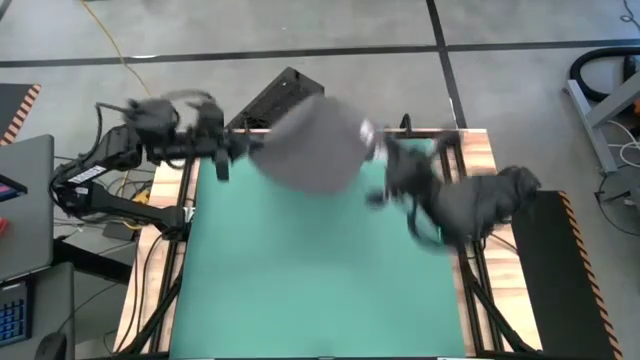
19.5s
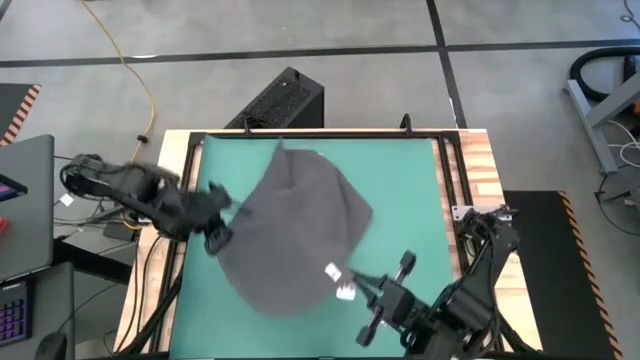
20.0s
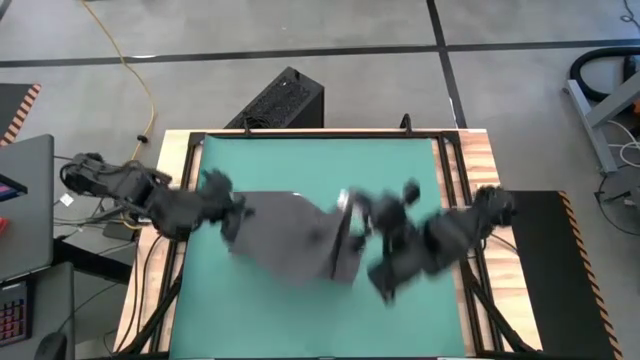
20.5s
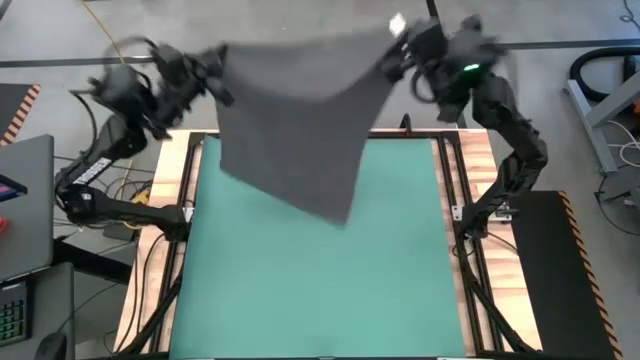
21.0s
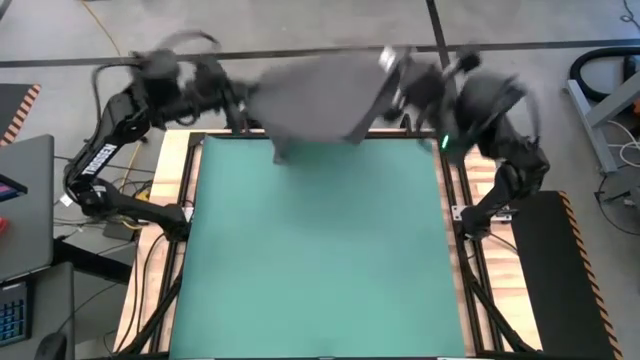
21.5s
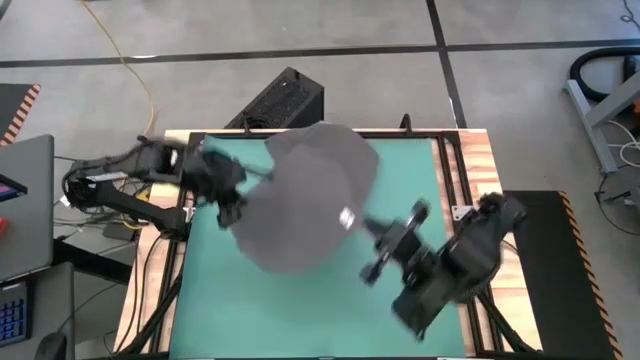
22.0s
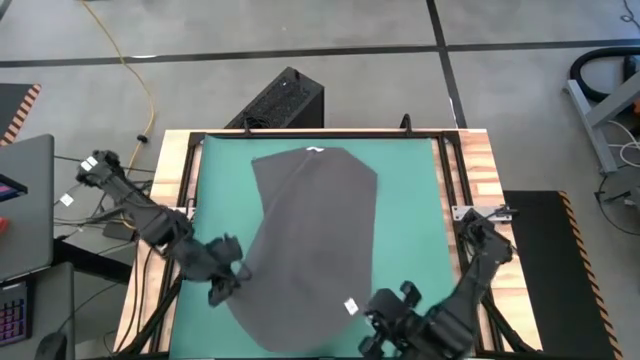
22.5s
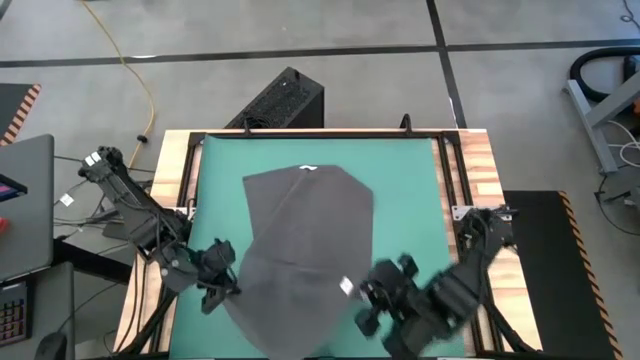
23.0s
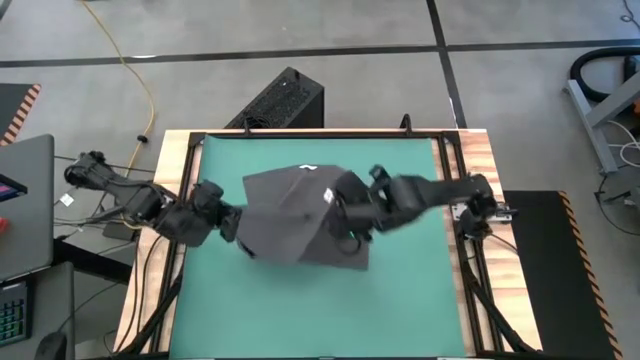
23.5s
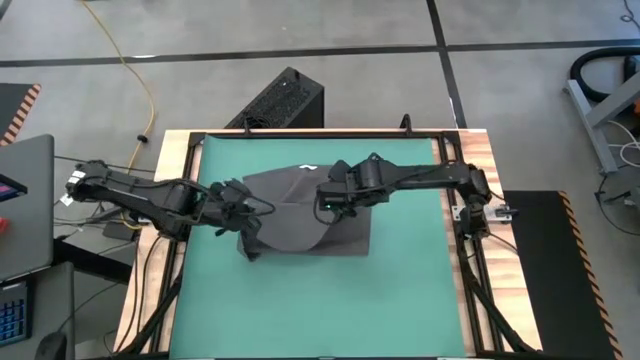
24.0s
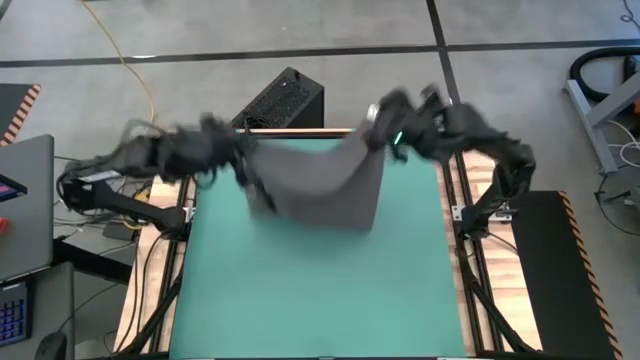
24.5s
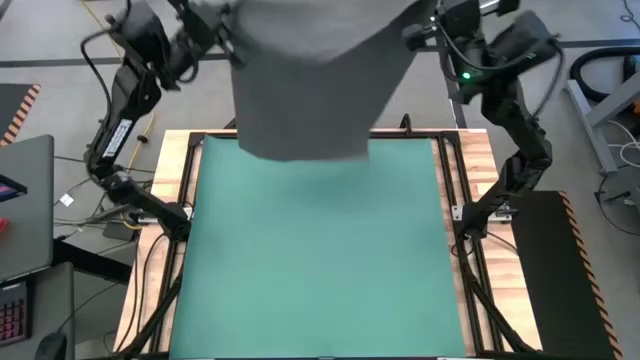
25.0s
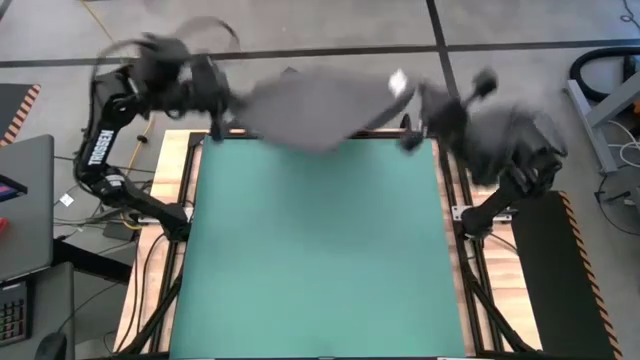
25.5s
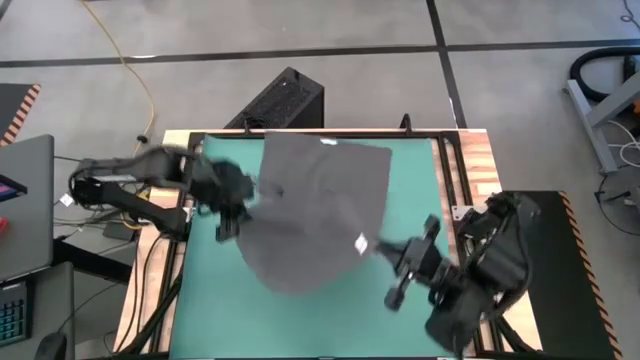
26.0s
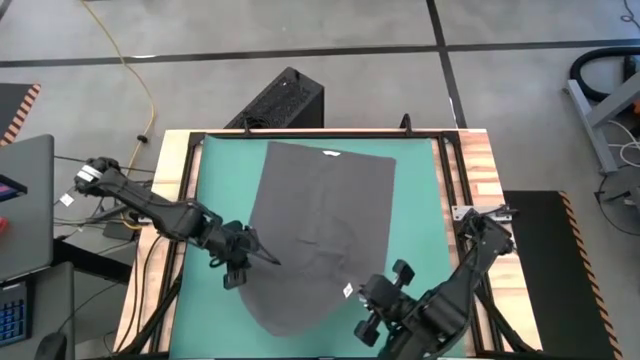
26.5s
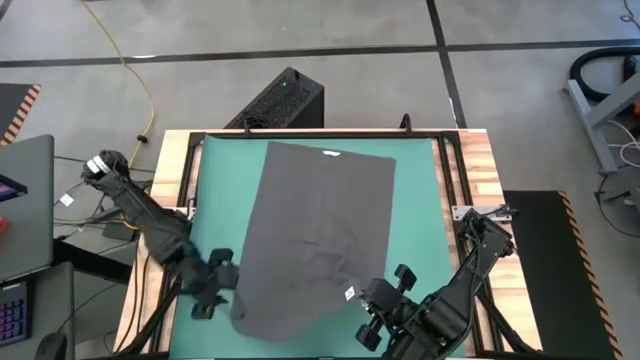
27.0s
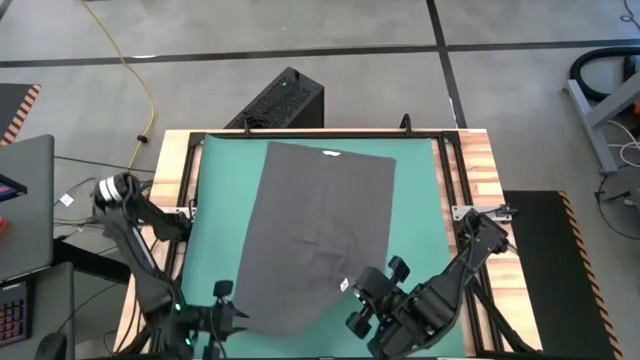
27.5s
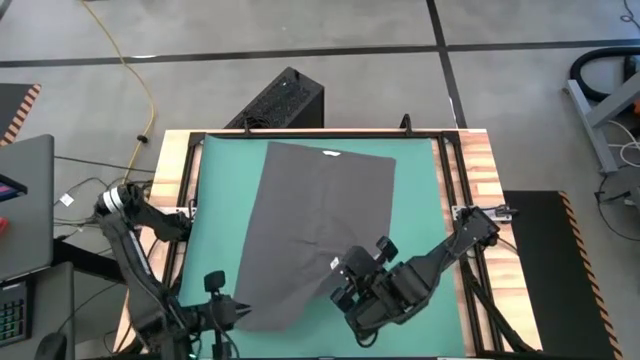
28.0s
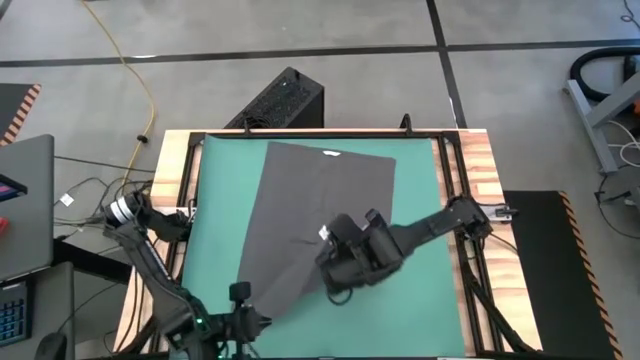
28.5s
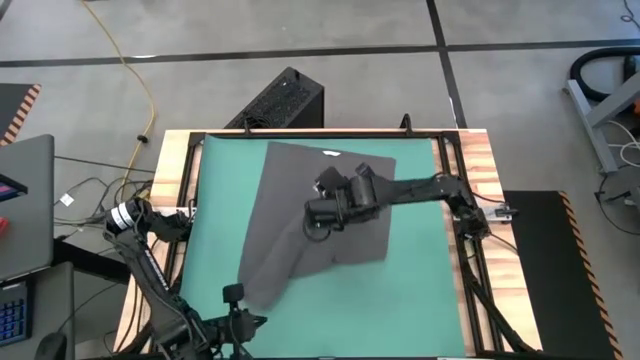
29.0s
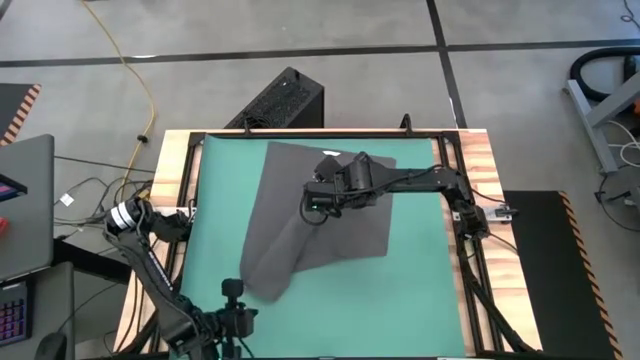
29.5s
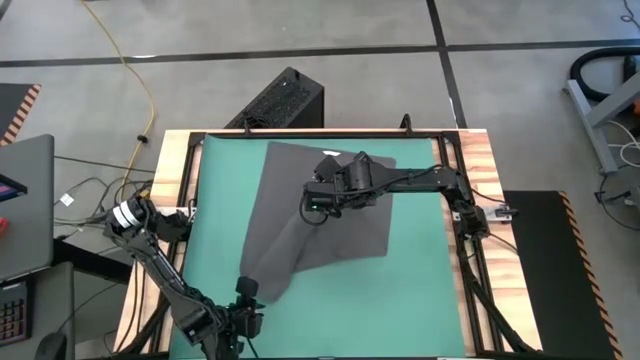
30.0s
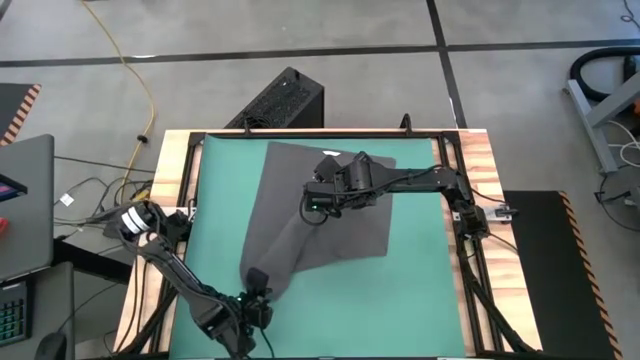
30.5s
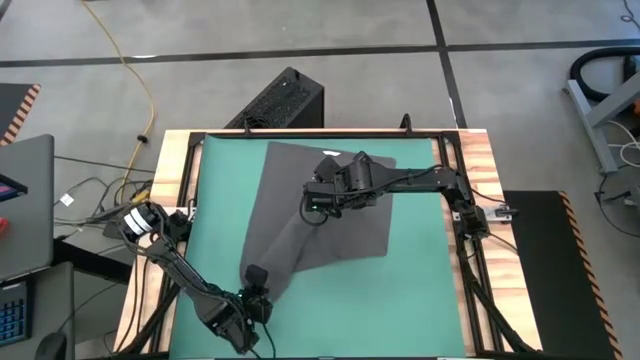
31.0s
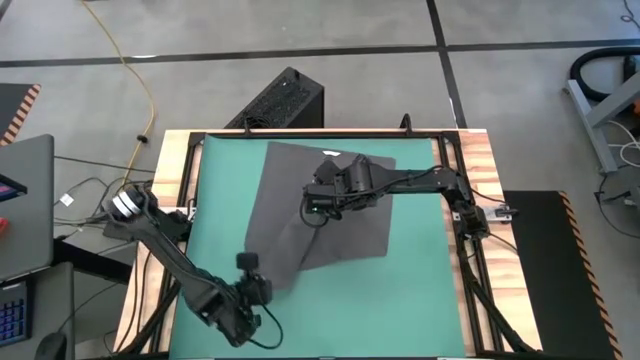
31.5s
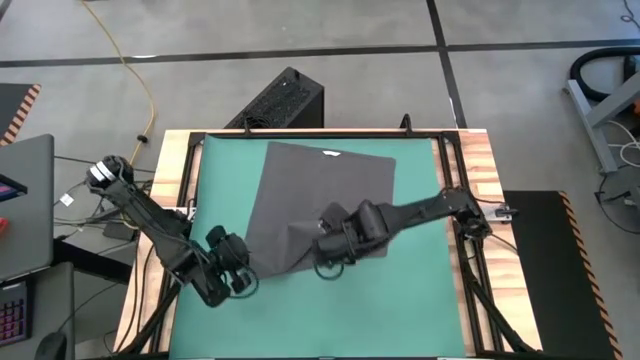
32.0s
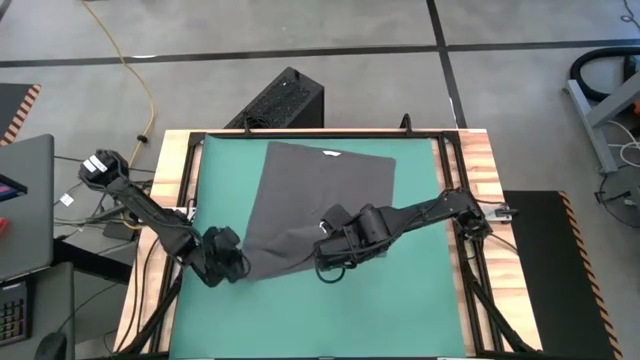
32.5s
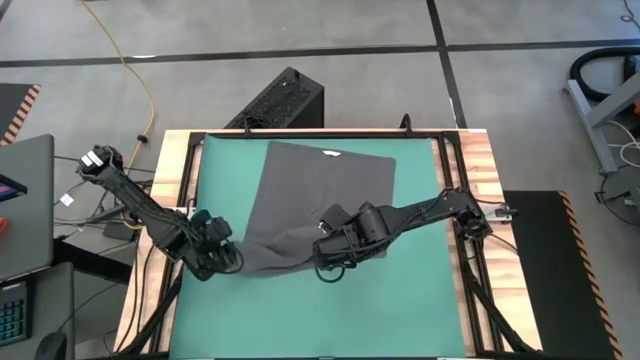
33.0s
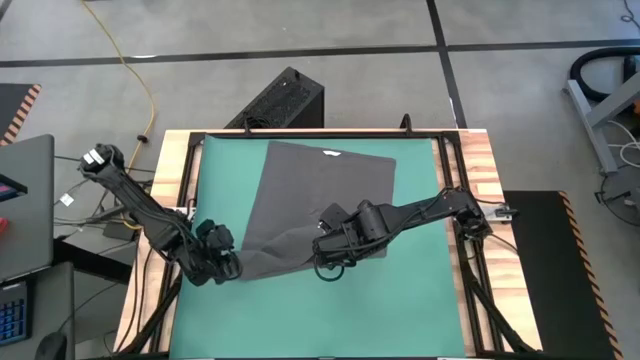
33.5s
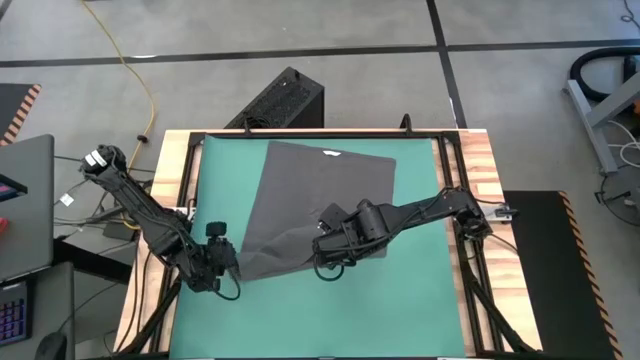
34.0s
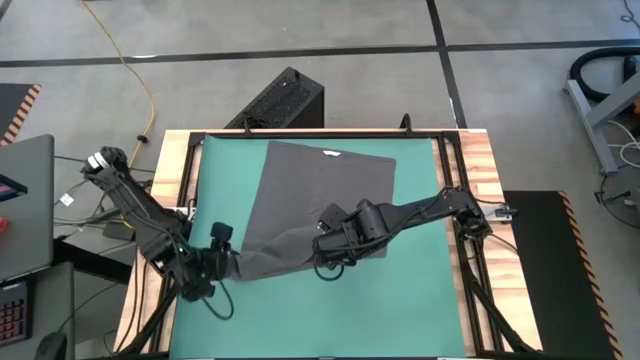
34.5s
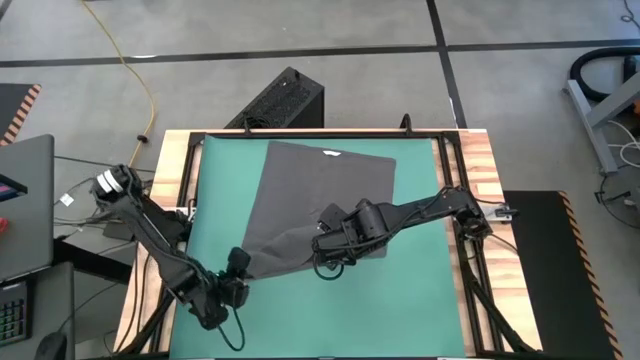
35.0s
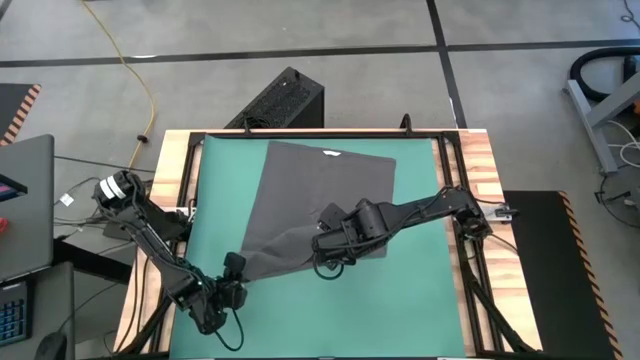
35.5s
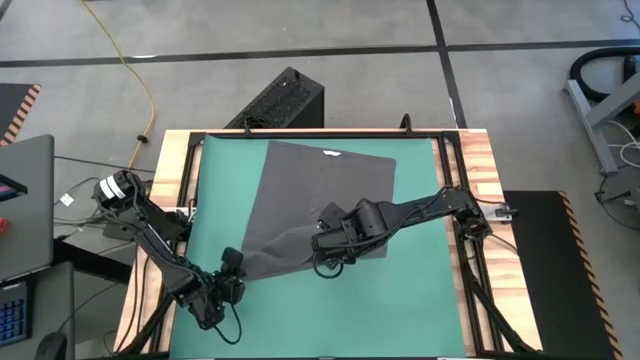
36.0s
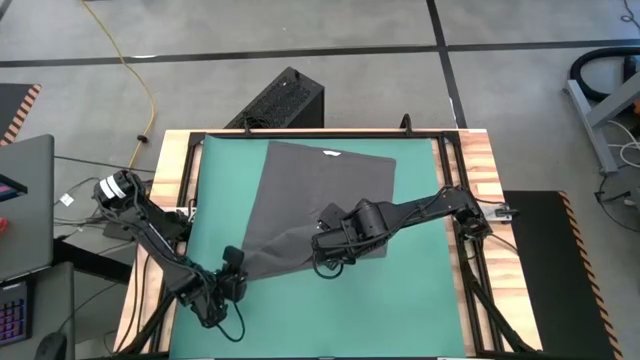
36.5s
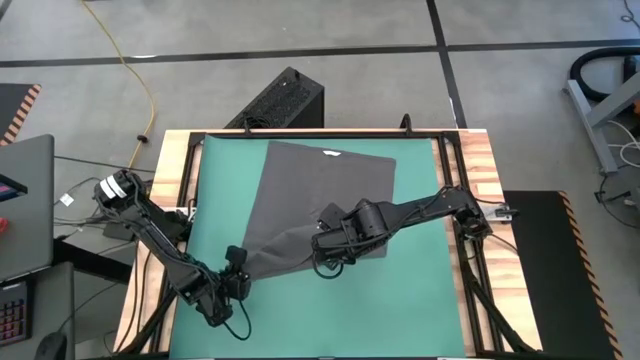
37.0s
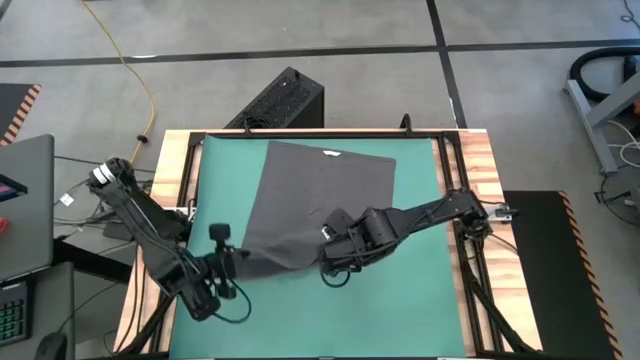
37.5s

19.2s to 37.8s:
Task: Roll towel
Fold the gray towel
